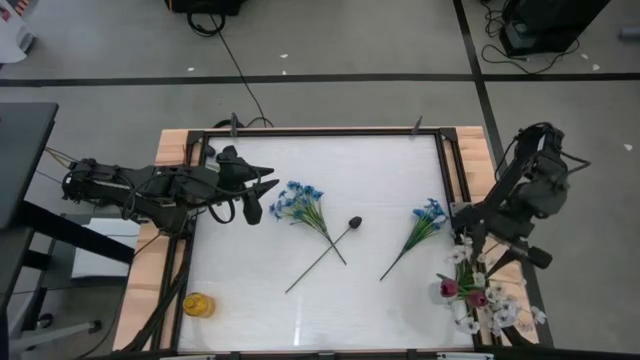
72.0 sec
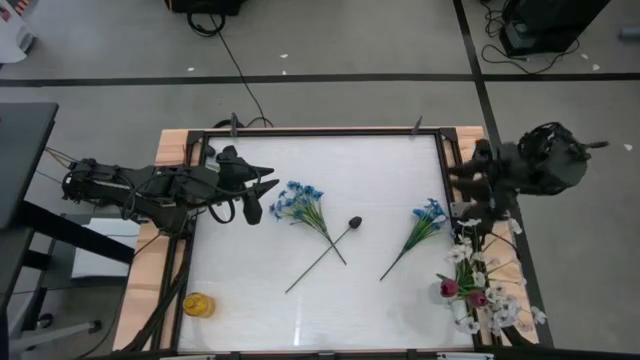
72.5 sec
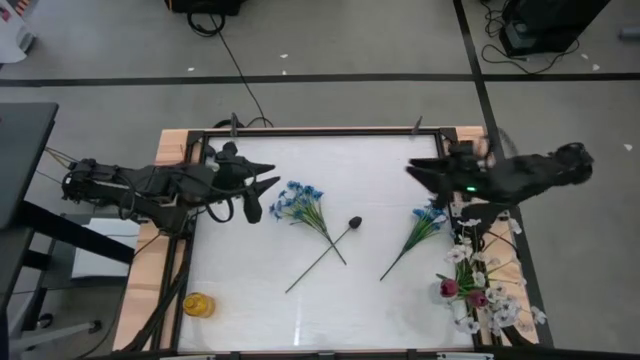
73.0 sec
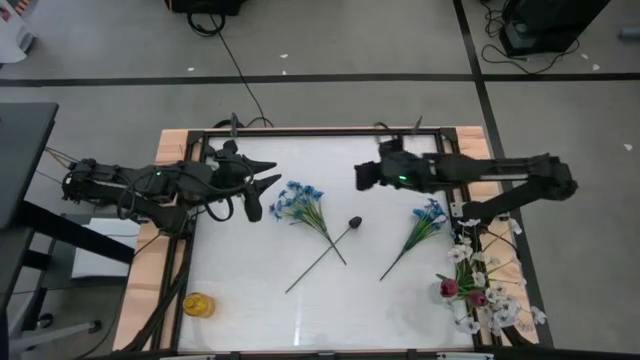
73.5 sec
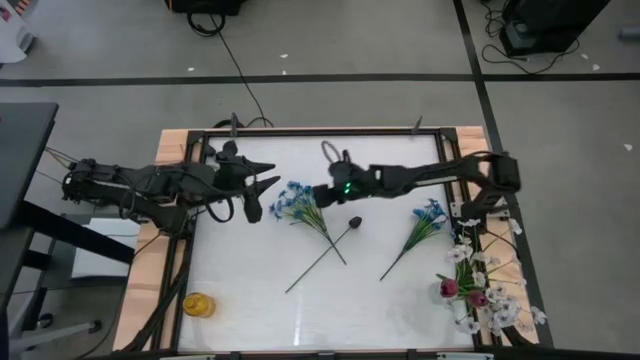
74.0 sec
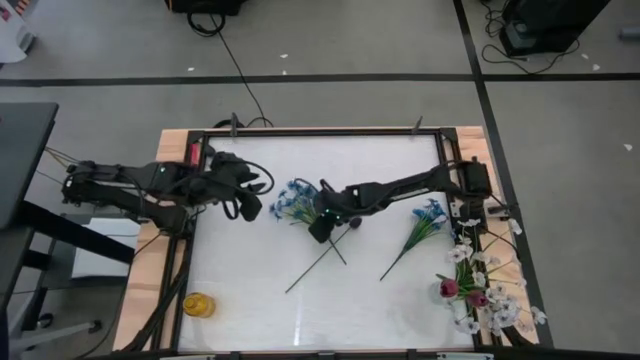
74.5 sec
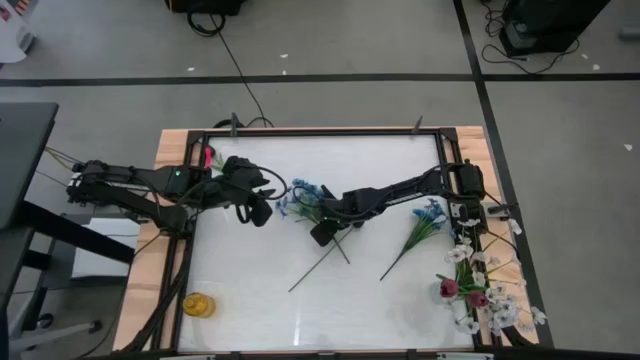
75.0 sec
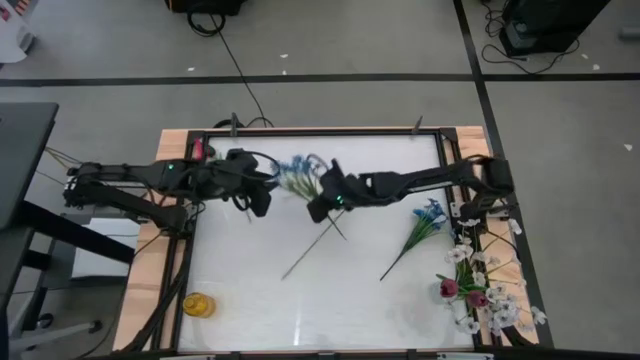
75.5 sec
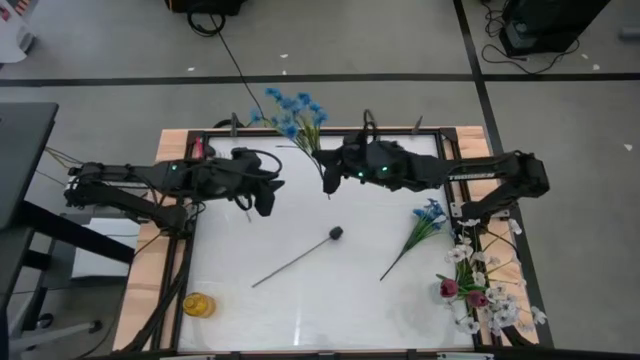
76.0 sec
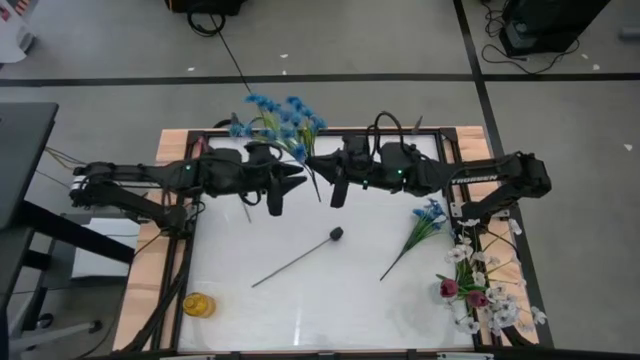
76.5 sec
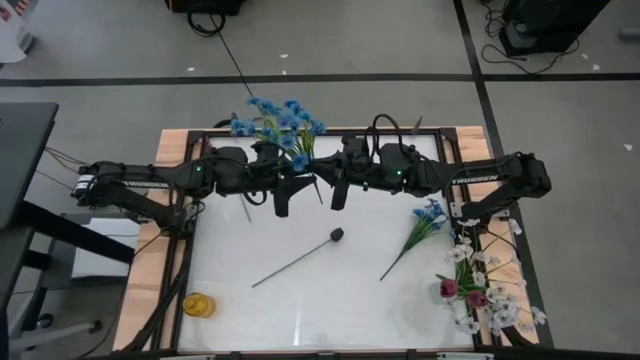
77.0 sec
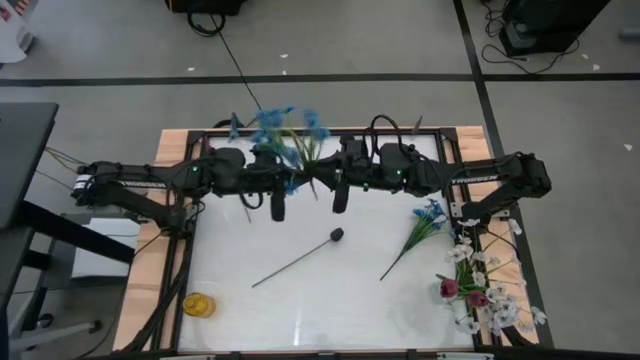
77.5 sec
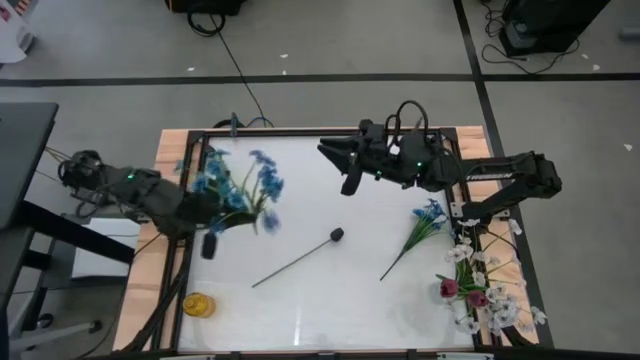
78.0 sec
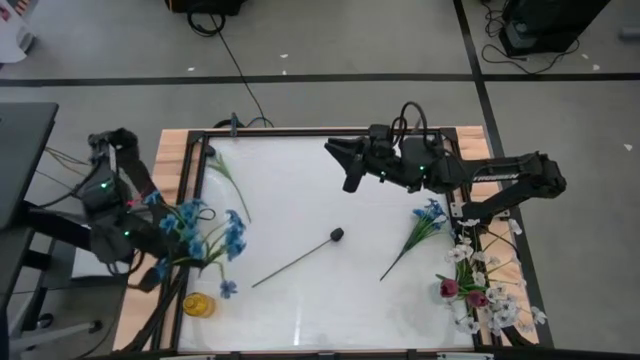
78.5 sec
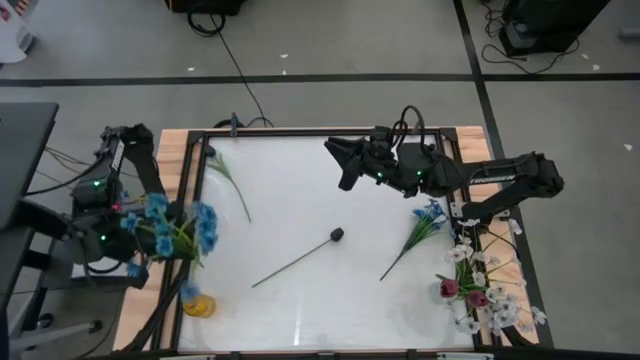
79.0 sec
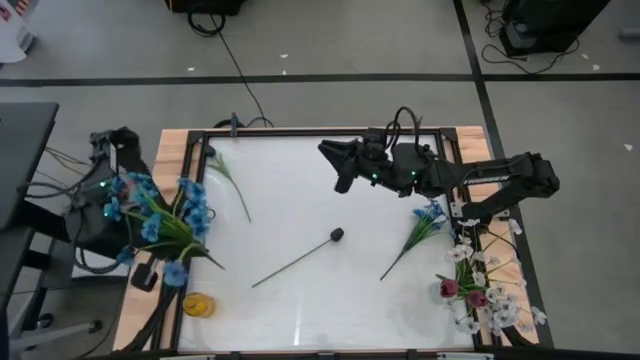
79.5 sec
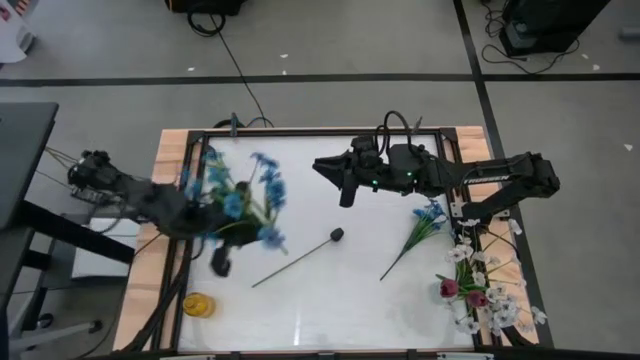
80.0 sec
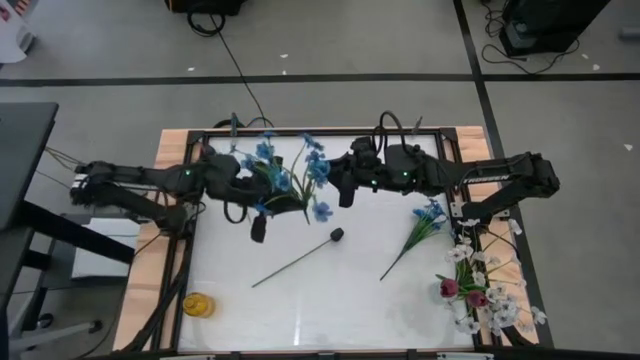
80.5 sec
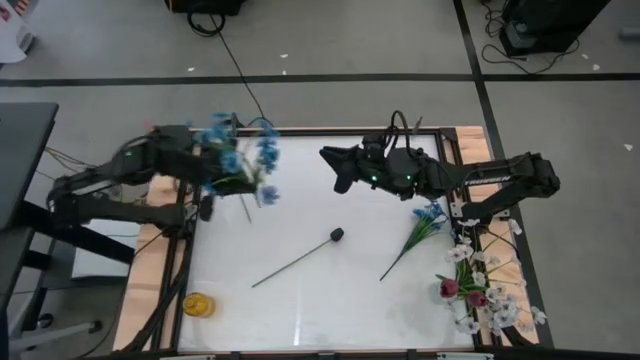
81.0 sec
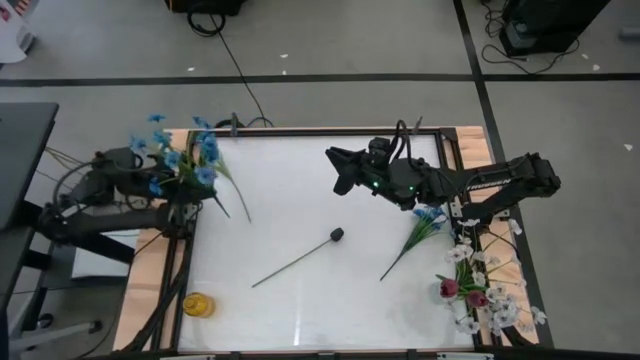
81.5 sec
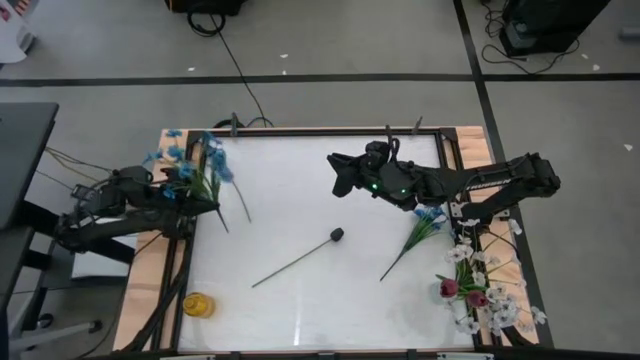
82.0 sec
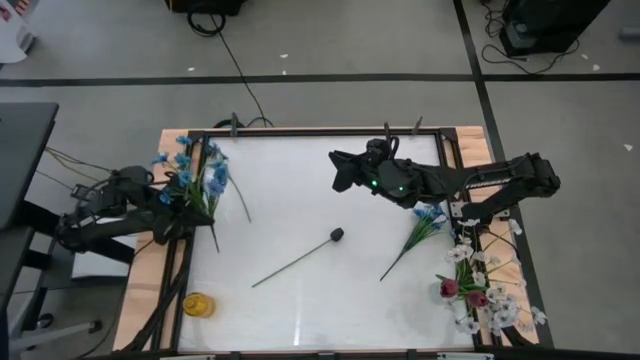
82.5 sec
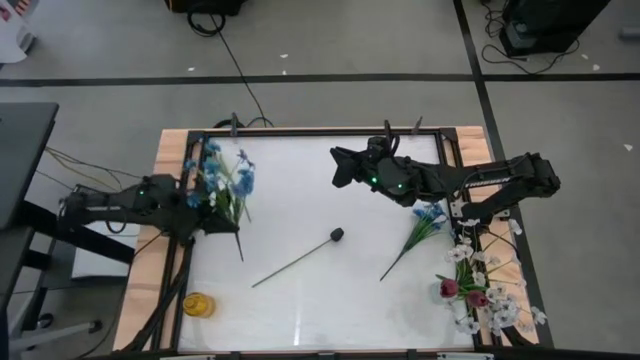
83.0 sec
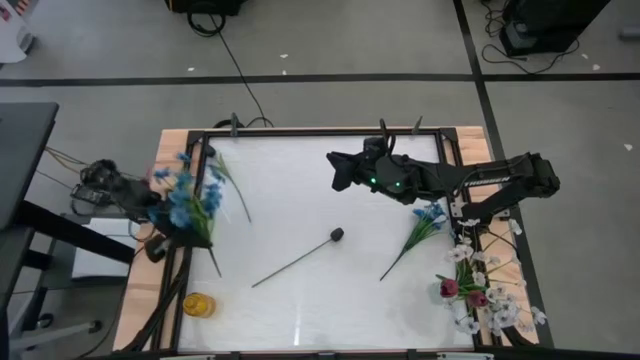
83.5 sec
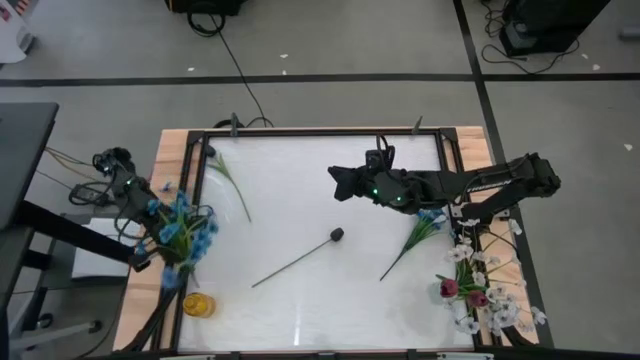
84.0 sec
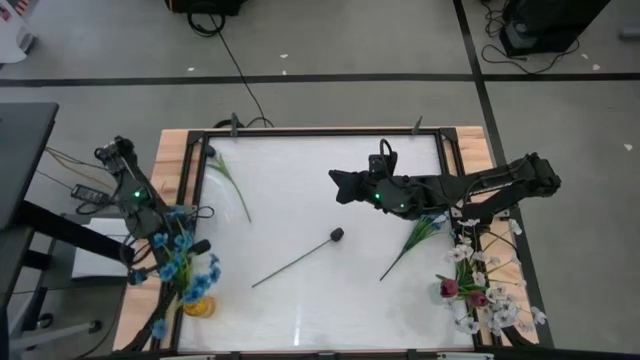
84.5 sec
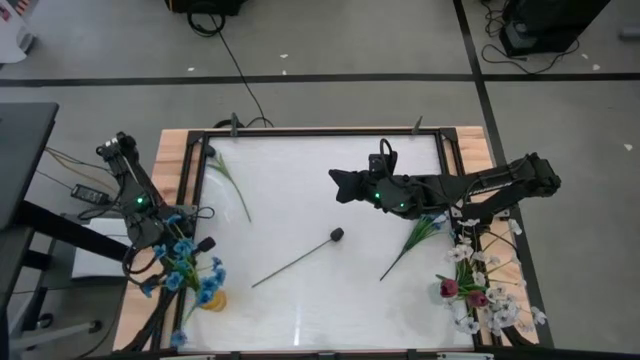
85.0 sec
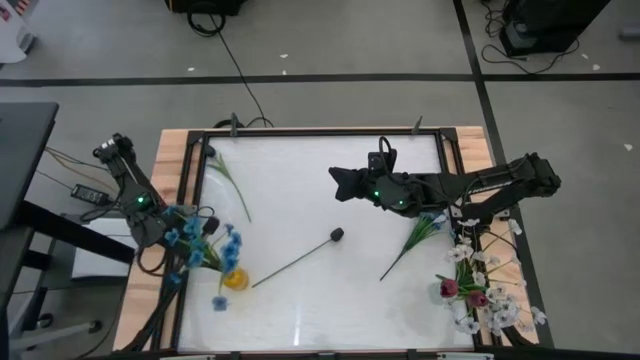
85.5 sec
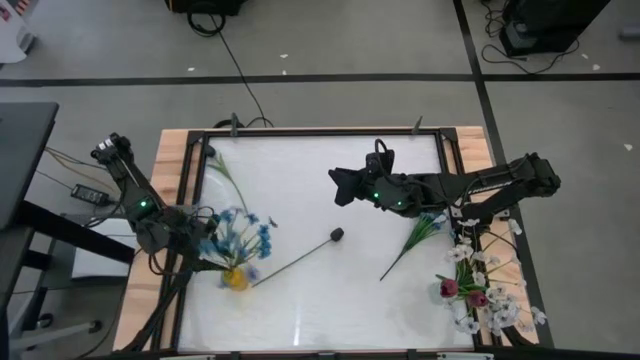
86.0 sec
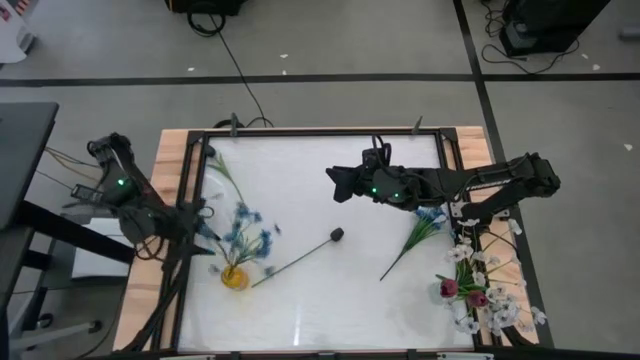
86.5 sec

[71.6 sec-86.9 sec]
Task: Sort flowers into vase by color
Put the left blue flowers into the yellow vase

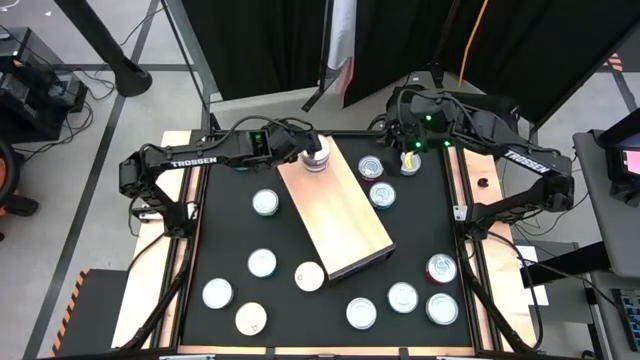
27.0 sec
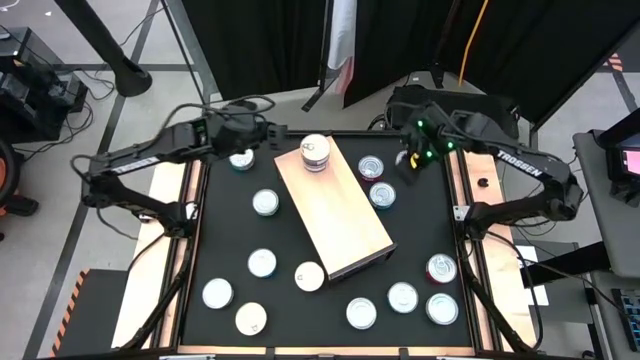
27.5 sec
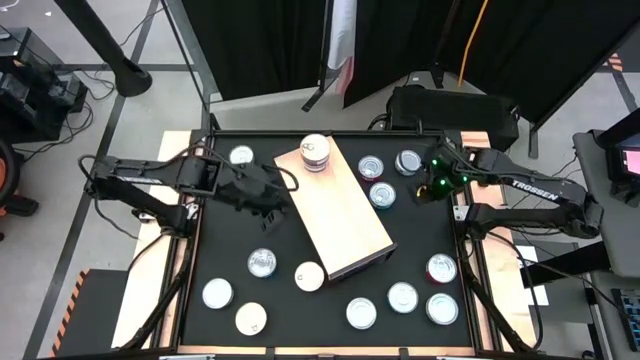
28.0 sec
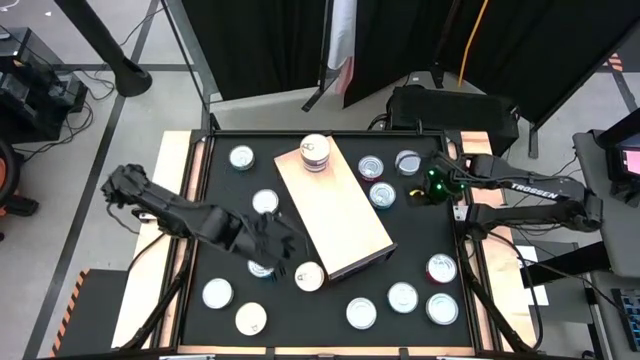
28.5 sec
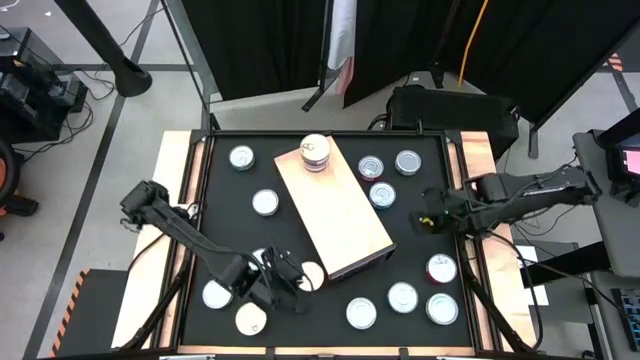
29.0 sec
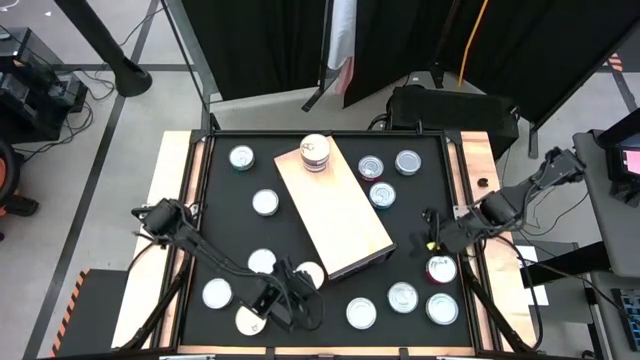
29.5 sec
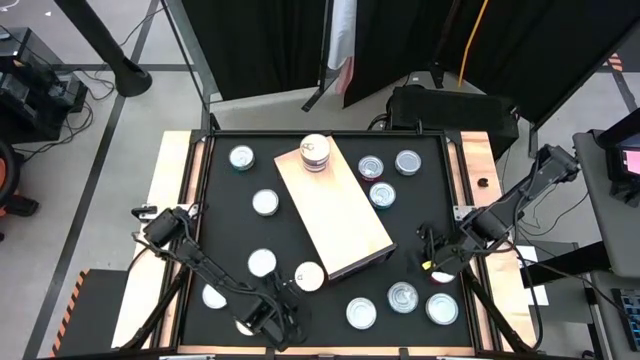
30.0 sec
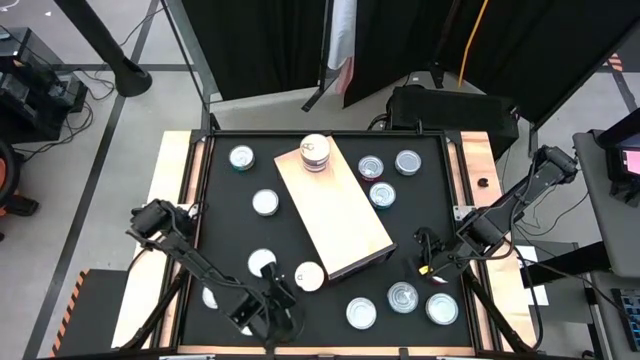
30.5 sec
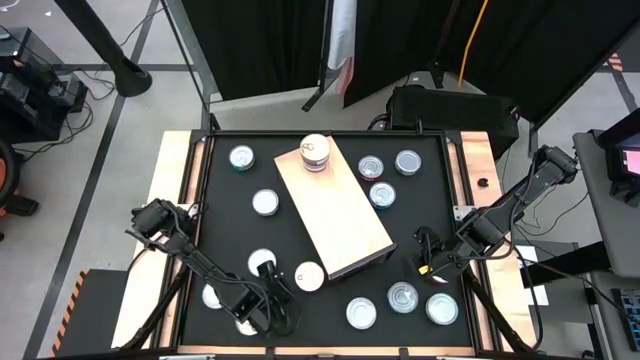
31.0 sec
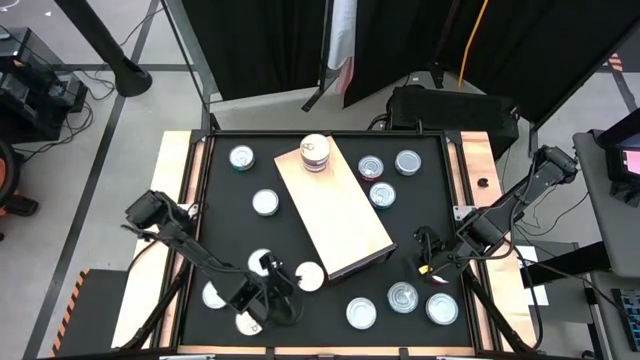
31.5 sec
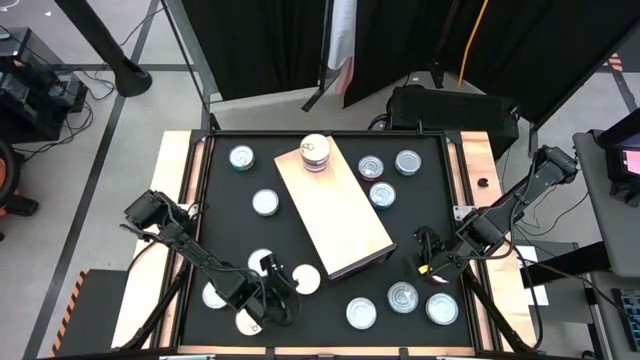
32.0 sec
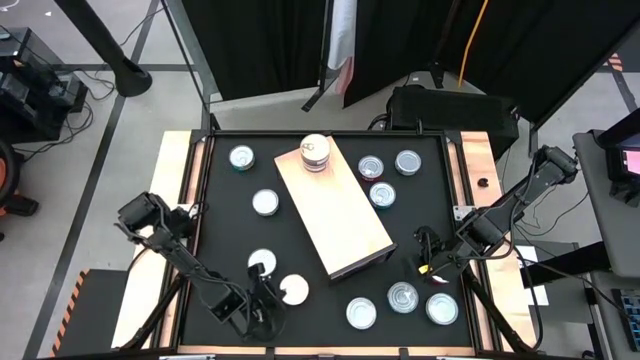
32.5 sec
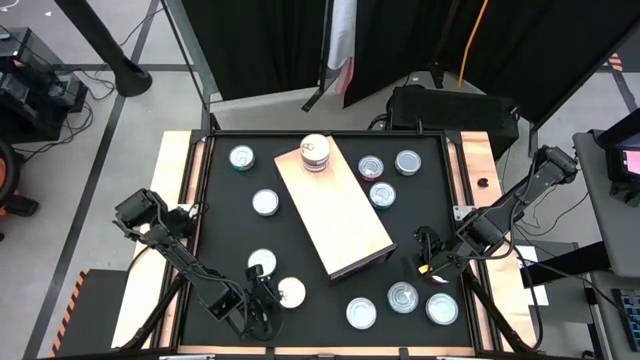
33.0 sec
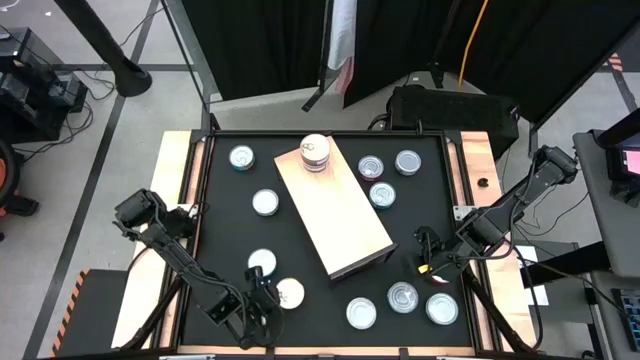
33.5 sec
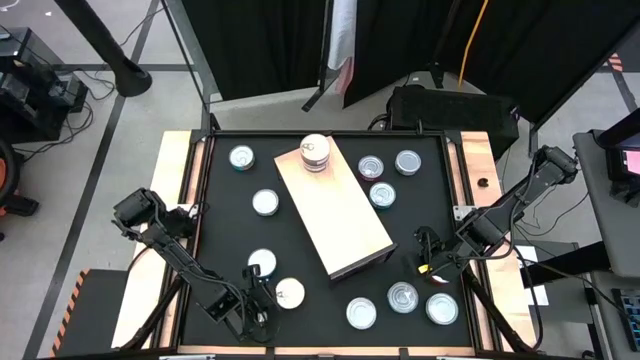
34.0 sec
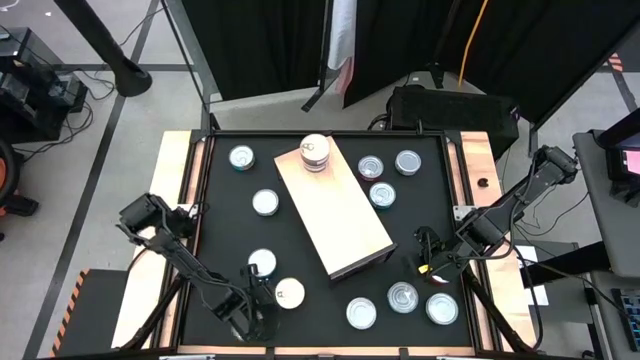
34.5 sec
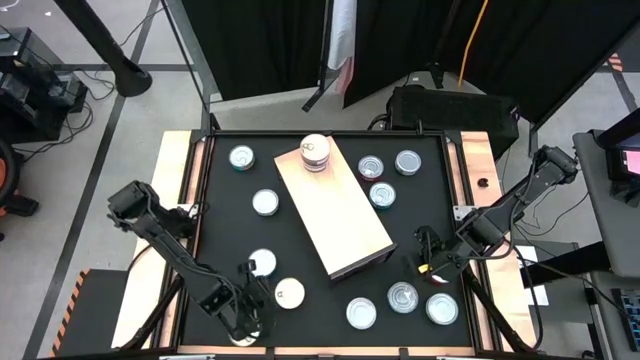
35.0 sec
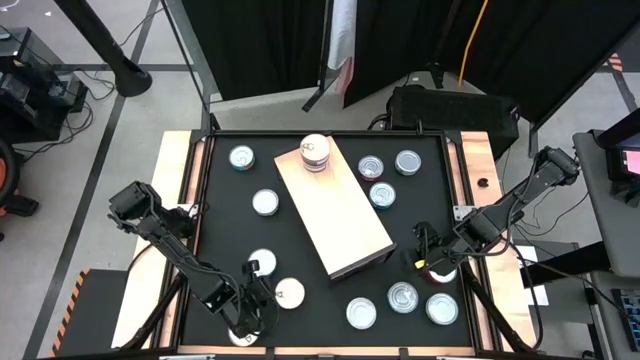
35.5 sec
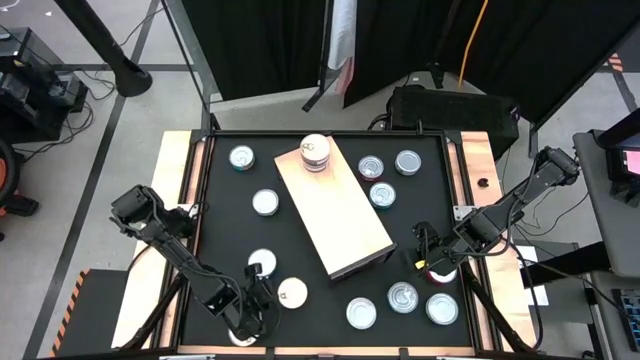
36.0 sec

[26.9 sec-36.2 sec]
Task: Stack canned seafood by type on shelf
Stack the blue-pink tuna can on top of the stacked blue-pink tuna can on the shelf
